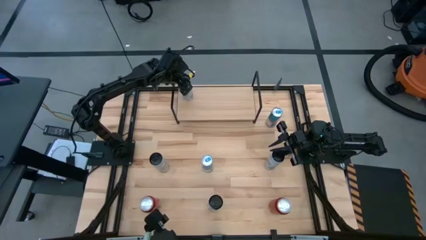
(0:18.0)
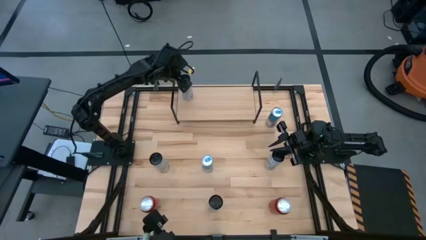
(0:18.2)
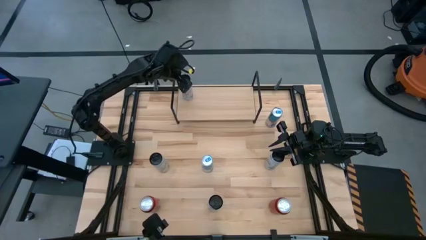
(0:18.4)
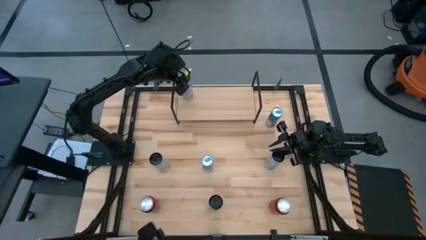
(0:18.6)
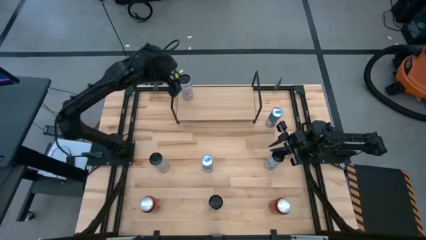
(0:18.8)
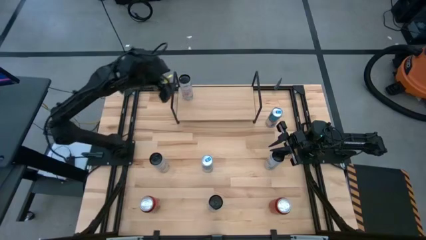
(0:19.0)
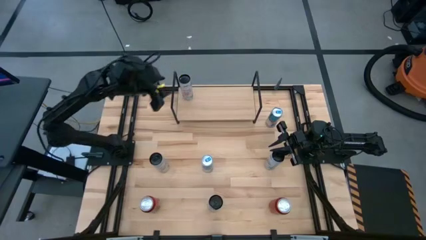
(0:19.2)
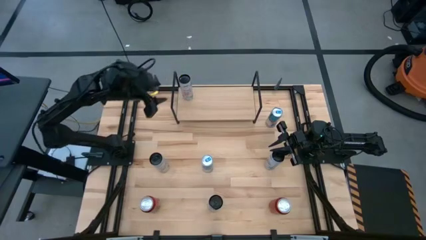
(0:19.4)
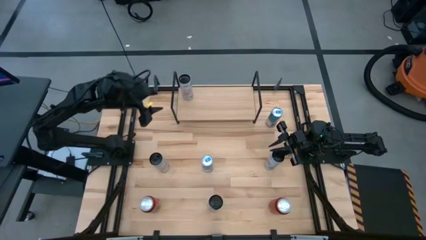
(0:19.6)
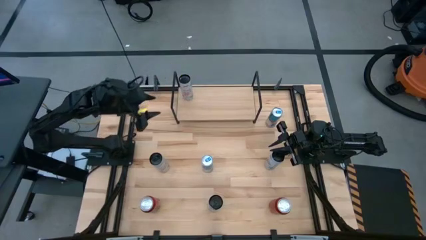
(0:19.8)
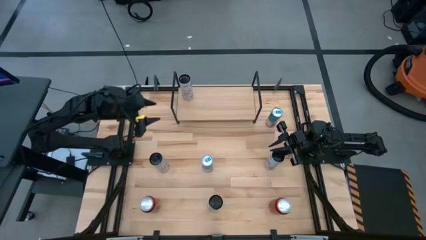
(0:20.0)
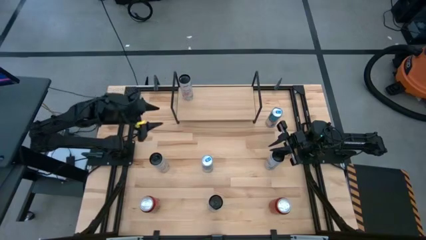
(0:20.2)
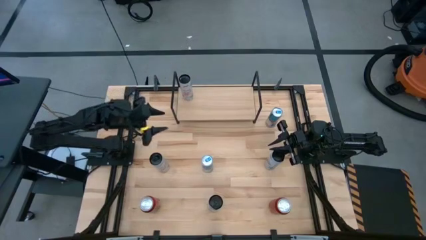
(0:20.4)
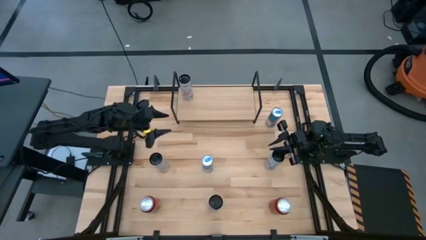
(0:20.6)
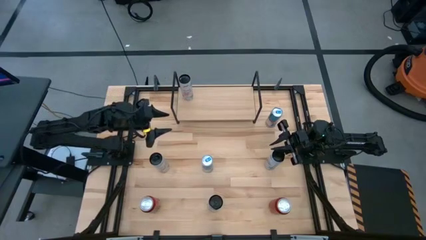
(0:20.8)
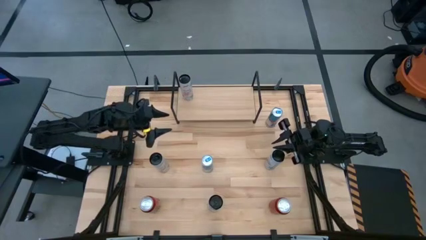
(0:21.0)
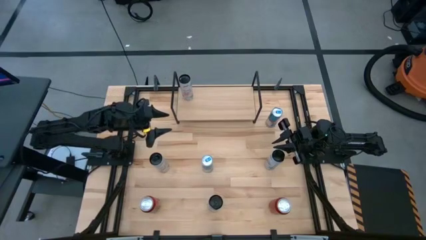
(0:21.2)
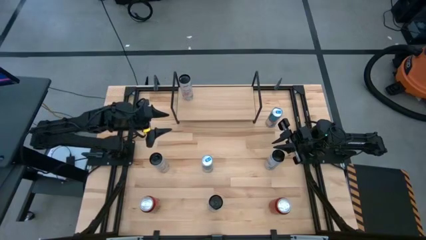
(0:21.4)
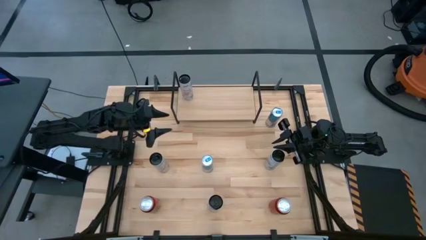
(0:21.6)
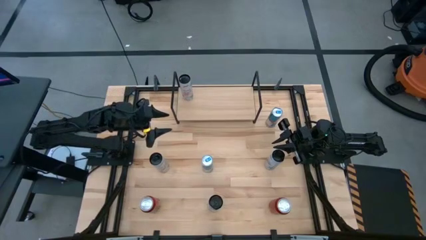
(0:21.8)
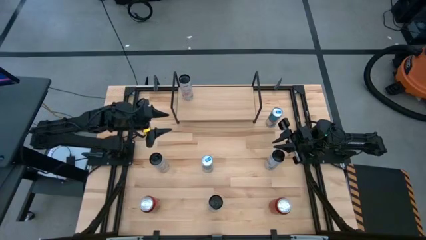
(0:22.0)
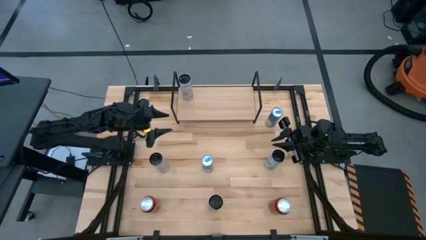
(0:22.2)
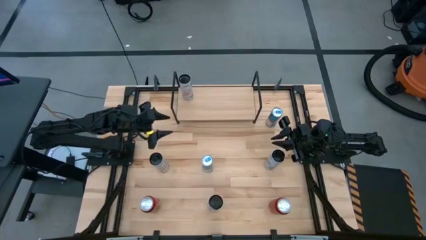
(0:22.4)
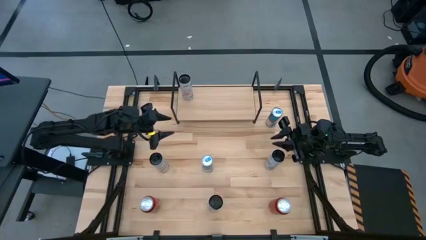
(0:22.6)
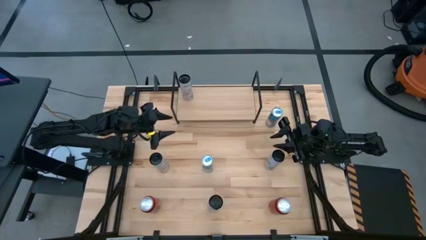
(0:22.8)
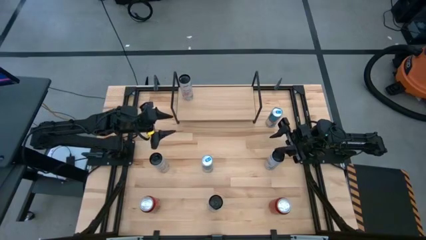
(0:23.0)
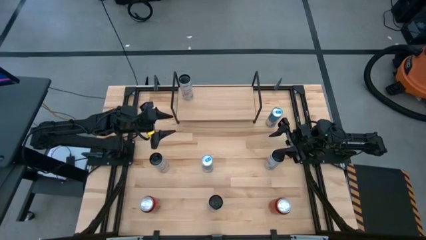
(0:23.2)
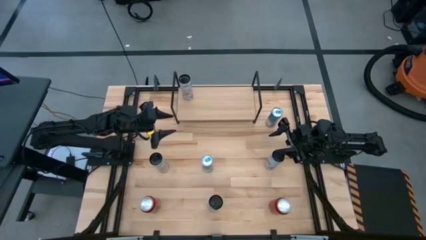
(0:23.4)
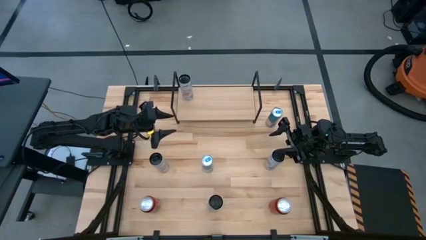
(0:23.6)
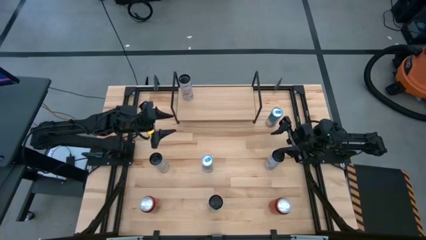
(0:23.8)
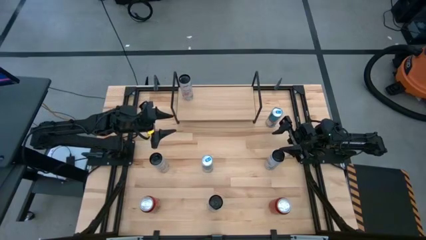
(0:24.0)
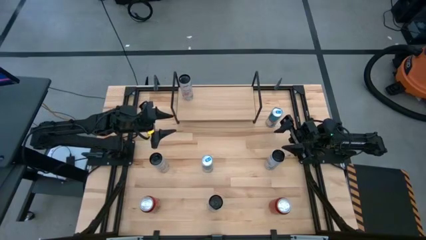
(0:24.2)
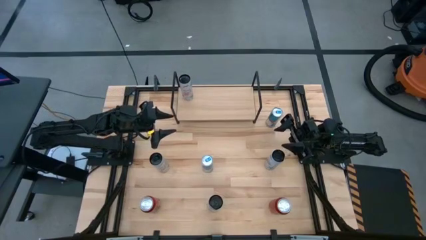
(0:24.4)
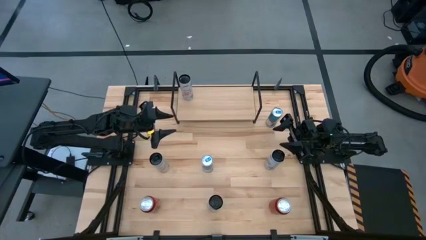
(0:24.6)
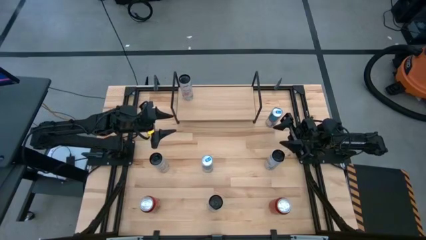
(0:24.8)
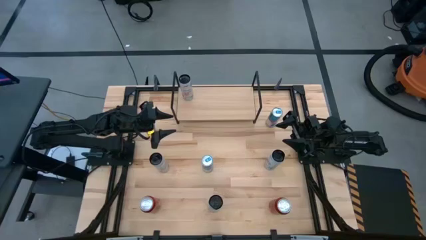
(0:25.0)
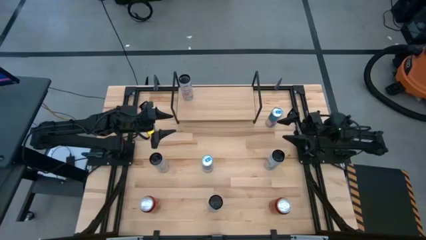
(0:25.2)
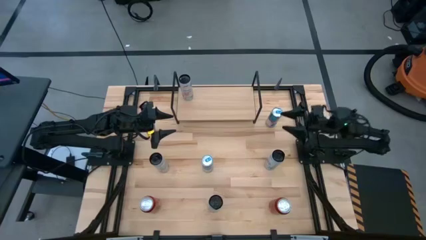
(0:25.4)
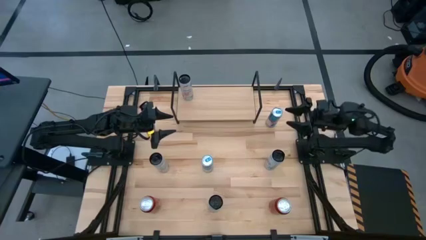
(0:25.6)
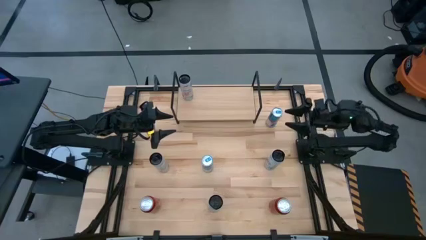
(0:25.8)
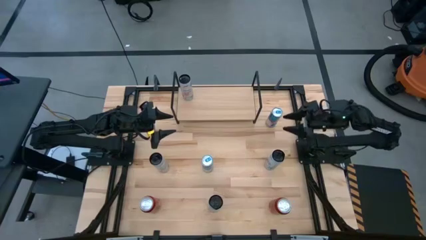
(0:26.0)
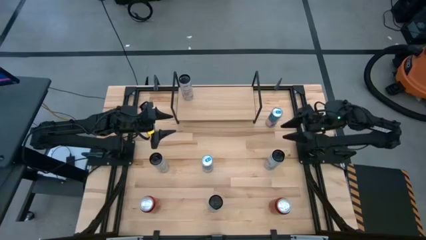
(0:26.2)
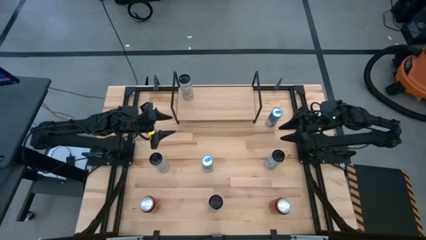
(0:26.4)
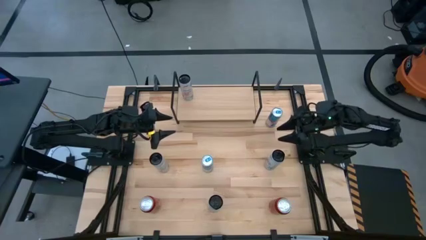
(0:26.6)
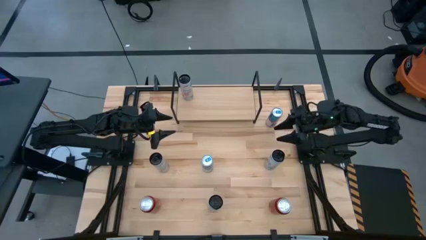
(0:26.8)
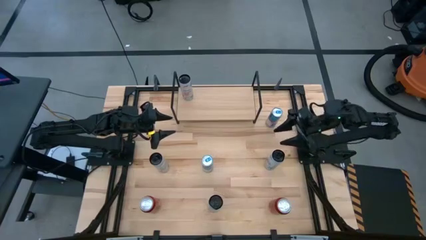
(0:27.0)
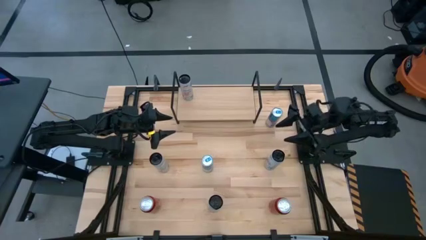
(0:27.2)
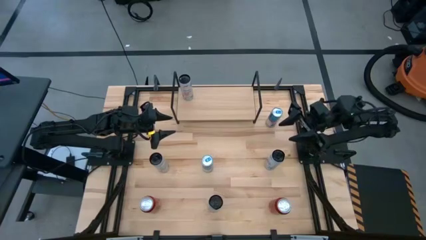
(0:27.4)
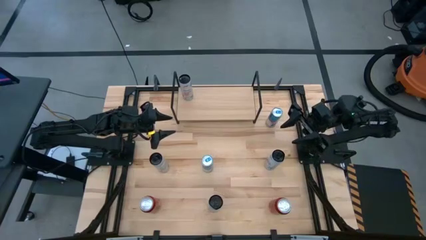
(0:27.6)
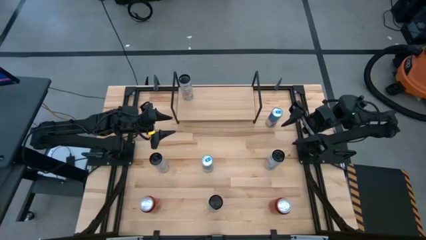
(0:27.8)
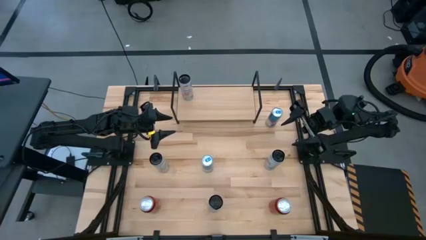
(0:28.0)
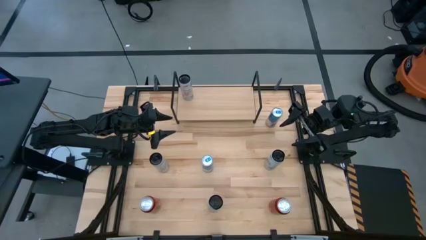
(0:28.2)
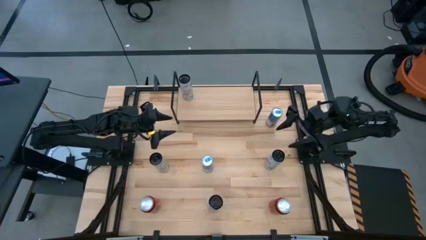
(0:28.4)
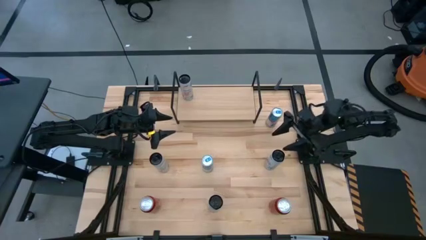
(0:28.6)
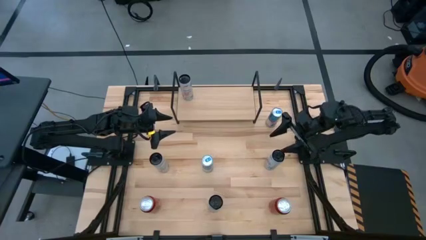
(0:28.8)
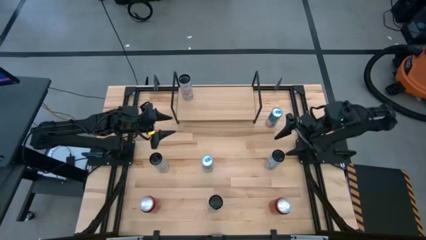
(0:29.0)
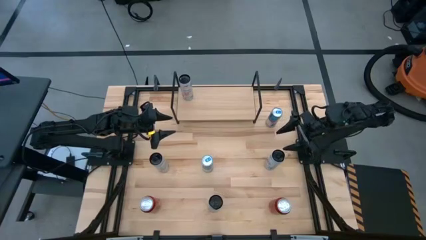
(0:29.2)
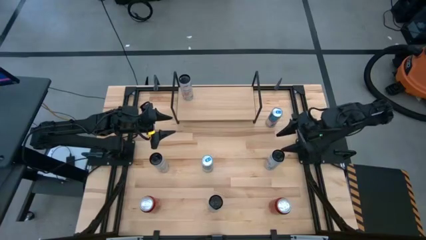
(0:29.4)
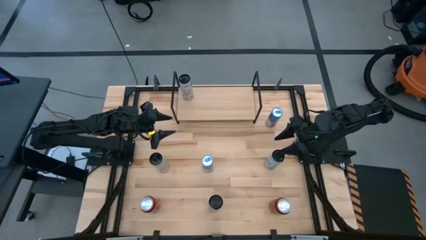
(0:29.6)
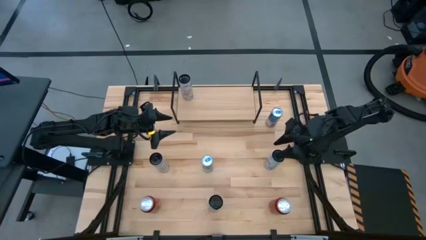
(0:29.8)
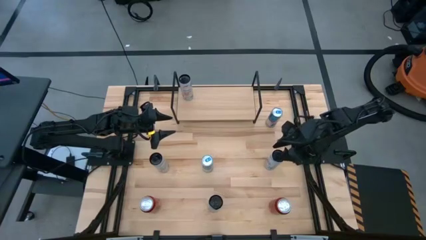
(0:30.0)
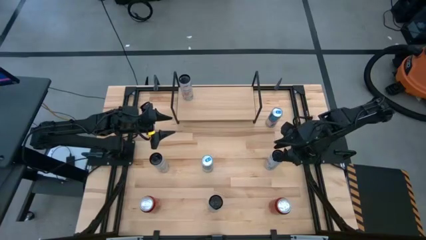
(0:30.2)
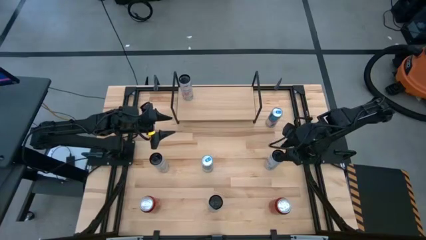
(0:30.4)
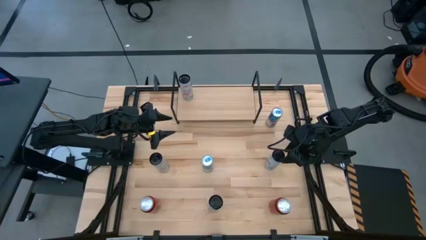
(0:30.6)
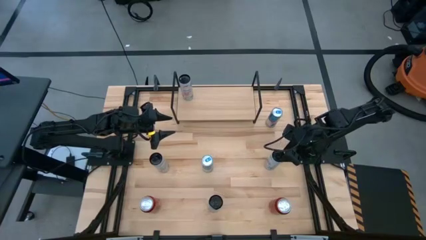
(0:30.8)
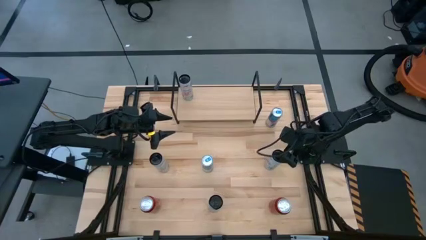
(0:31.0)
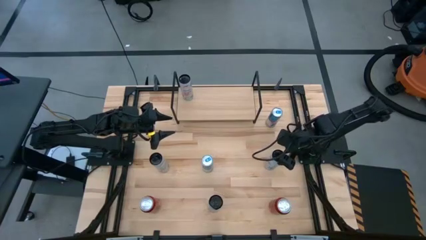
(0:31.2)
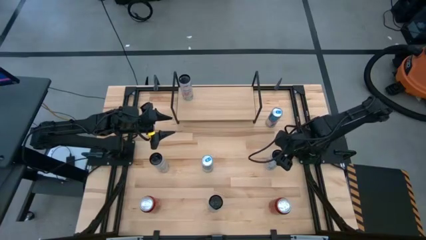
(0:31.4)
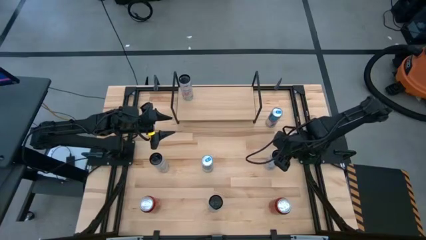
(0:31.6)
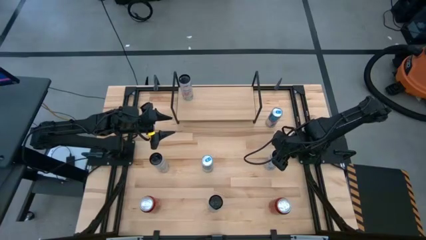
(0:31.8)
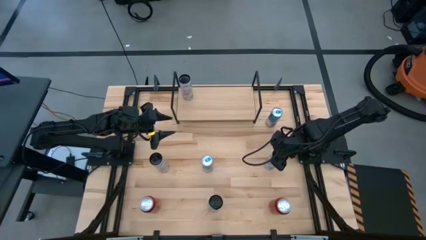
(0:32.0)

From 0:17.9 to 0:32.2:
Task: Place canned beverage on shelf
Put the top white blue soda can on the shelf

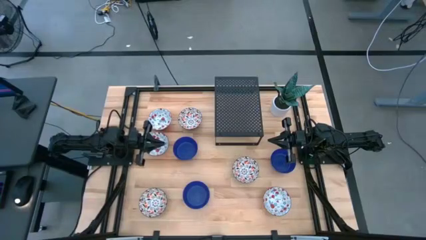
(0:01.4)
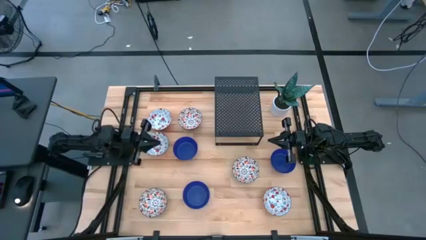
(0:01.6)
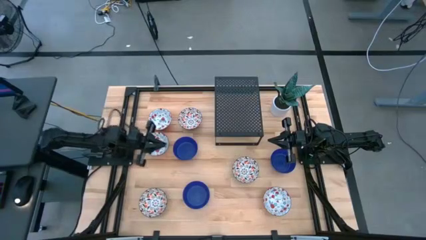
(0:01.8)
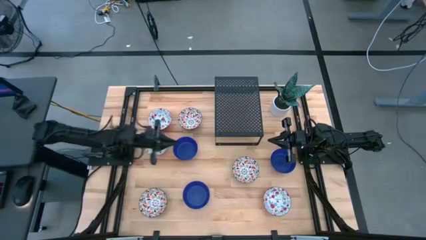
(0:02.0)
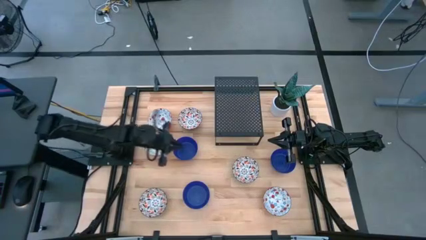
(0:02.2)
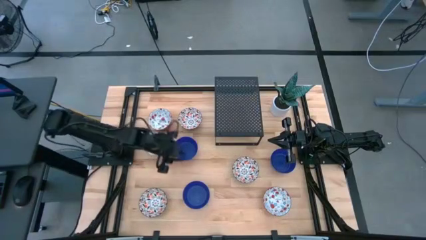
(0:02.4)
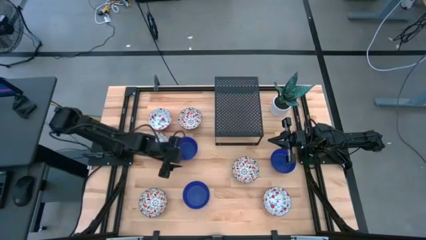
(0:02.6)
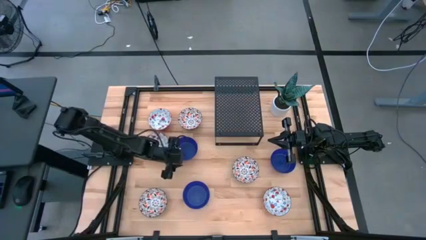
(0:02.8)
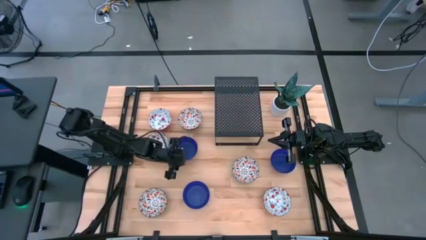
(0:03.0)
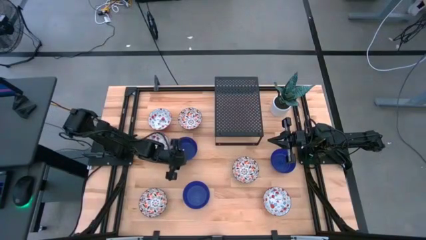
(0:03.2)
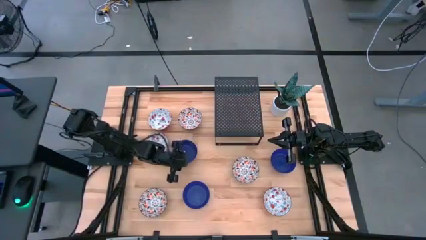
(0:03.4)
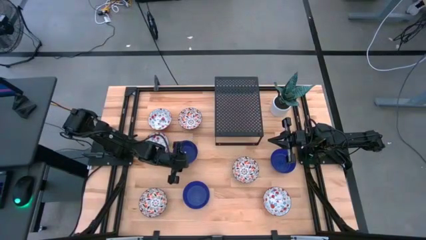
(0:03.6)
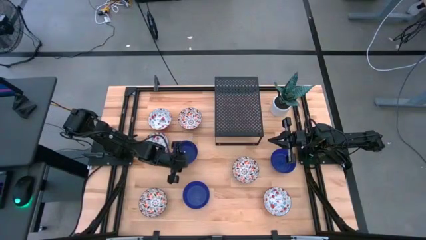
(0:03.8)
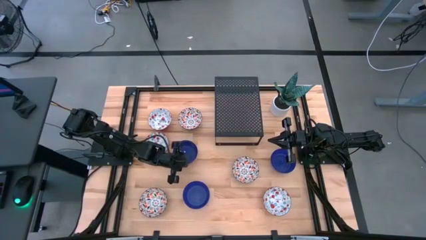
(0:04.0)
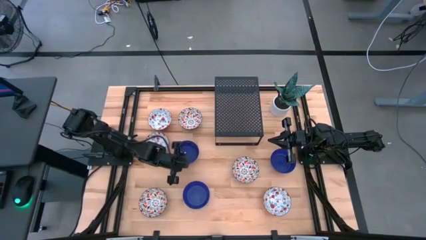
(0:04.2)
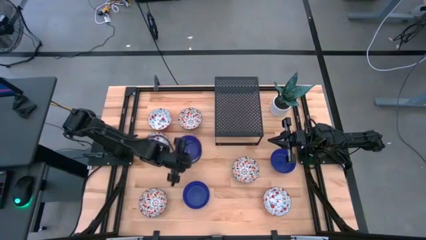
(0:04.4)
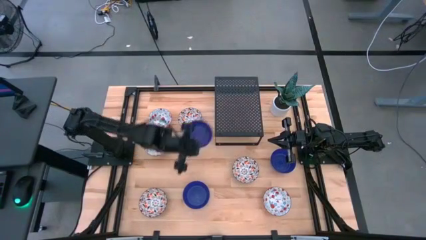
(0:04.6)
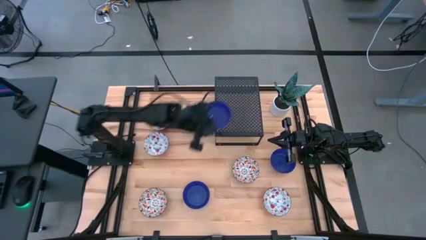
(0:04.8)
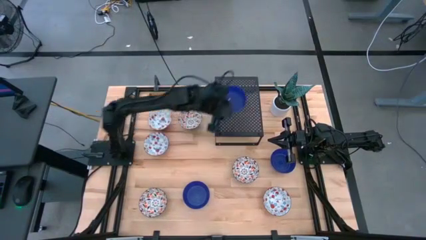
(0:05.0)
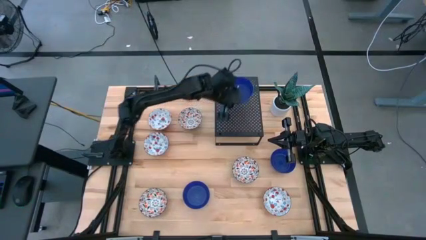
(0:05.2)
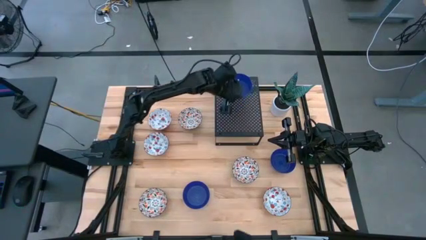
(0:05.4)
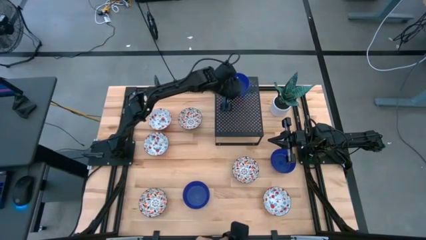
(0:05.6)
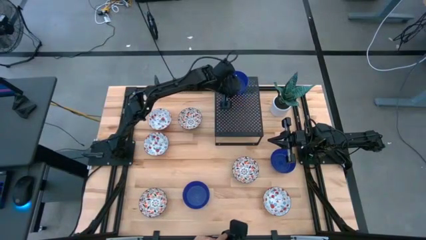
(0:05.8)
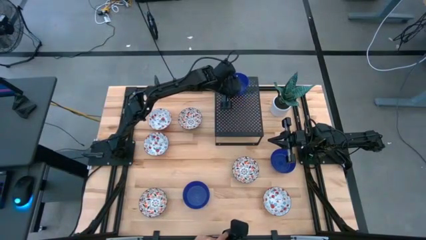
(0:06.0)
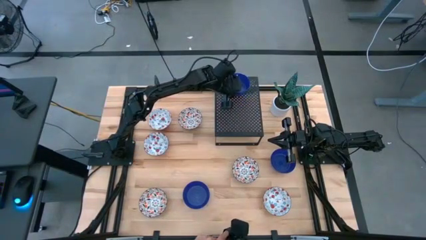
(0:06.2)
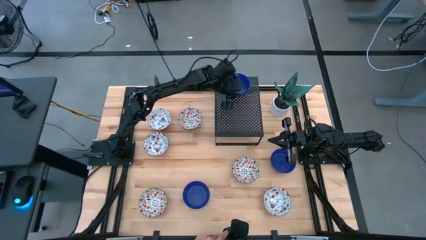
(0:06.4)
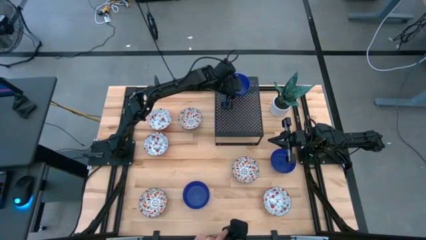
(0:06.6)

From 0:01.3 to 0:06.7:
Task: Pick & Place Mini bowls
Put the top left blue bowl on the shelf
